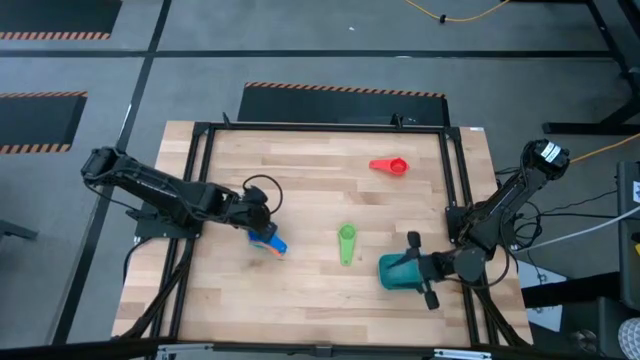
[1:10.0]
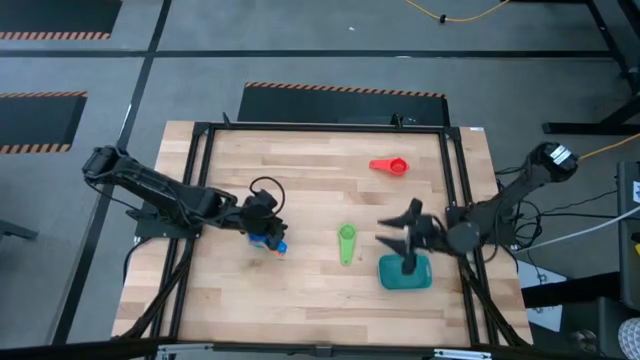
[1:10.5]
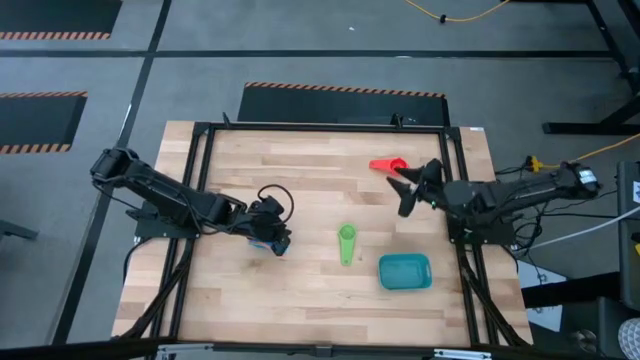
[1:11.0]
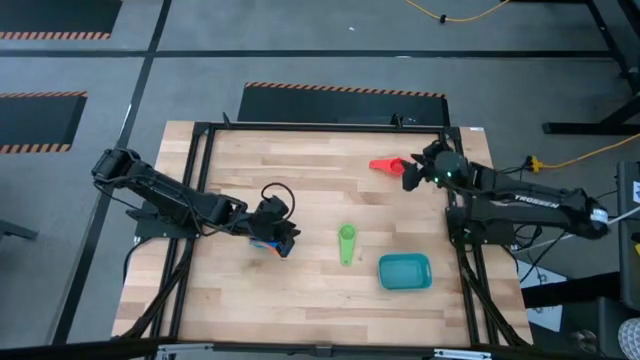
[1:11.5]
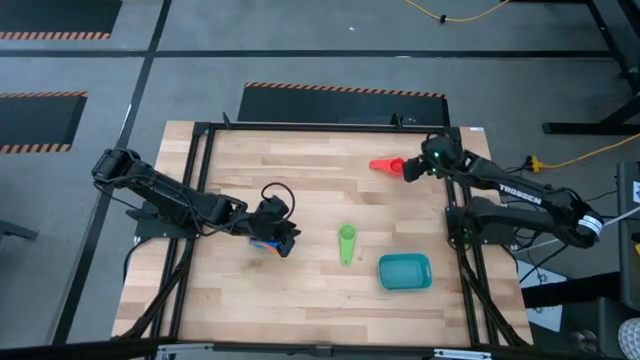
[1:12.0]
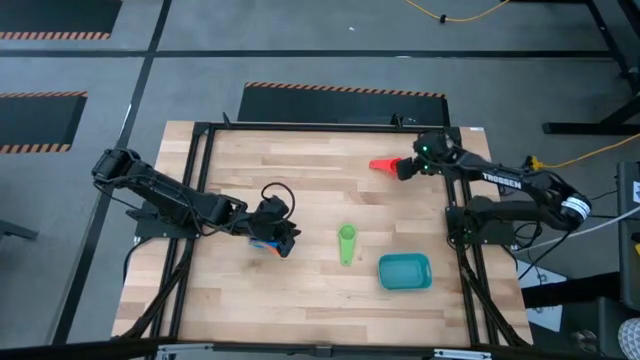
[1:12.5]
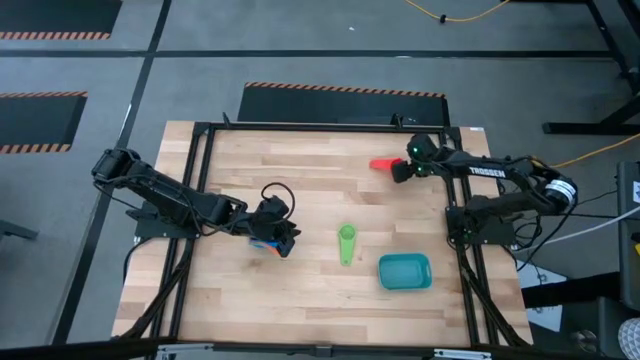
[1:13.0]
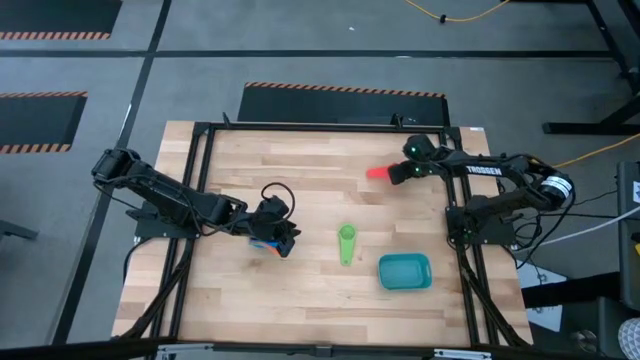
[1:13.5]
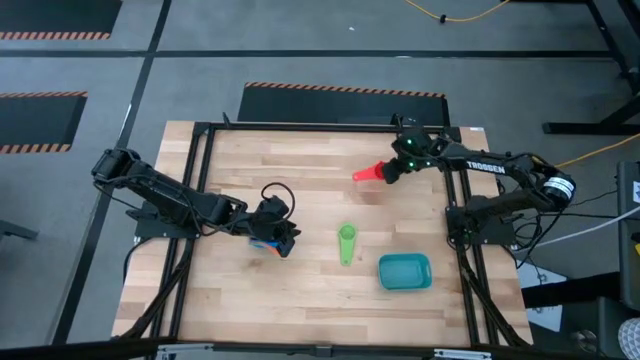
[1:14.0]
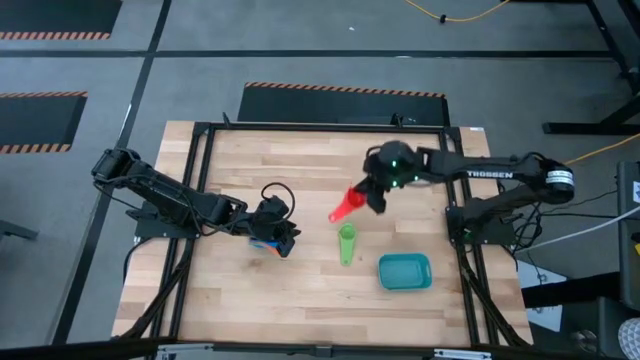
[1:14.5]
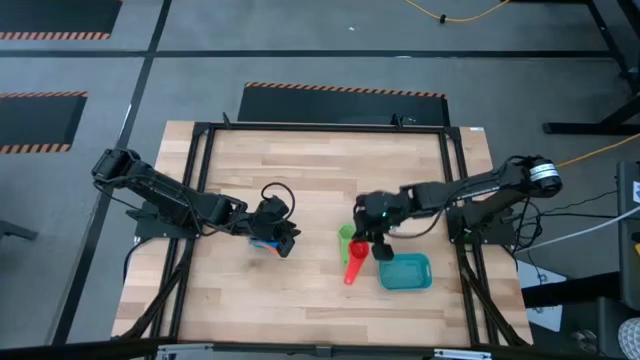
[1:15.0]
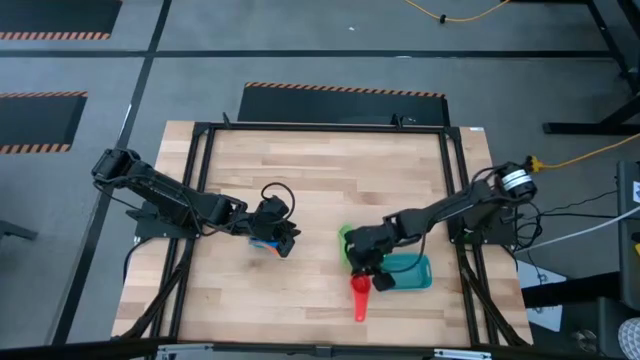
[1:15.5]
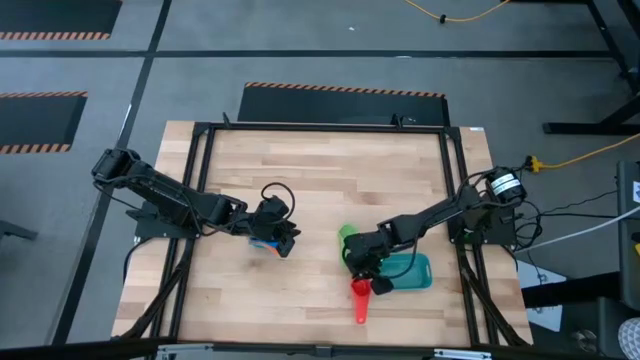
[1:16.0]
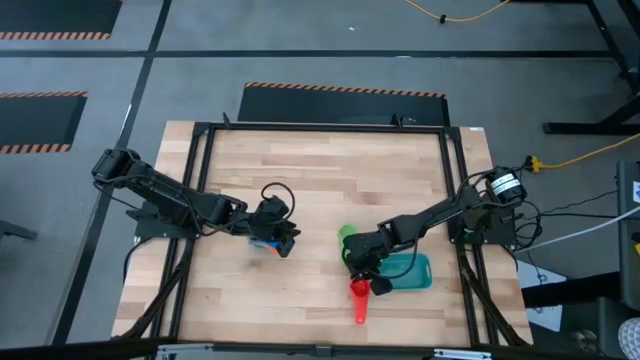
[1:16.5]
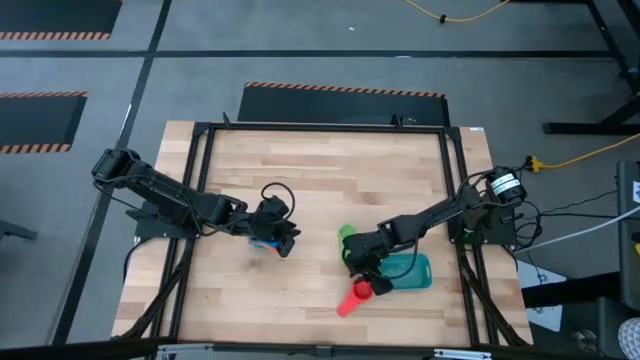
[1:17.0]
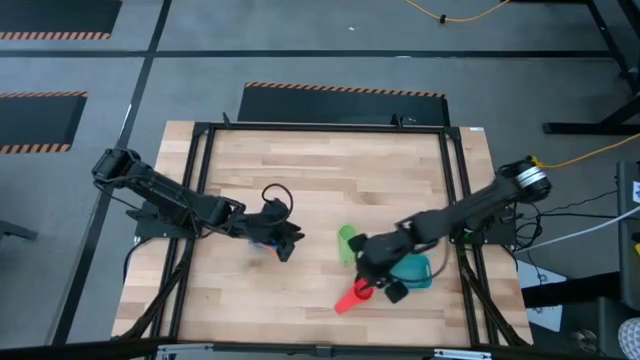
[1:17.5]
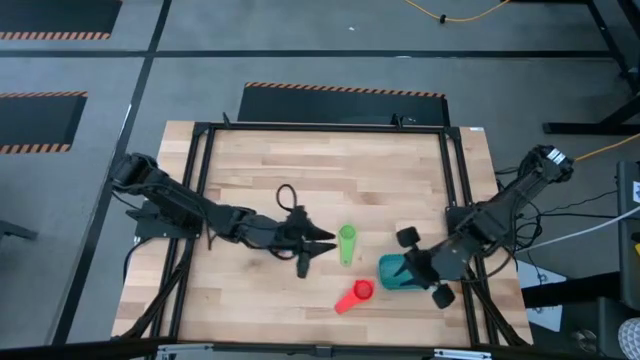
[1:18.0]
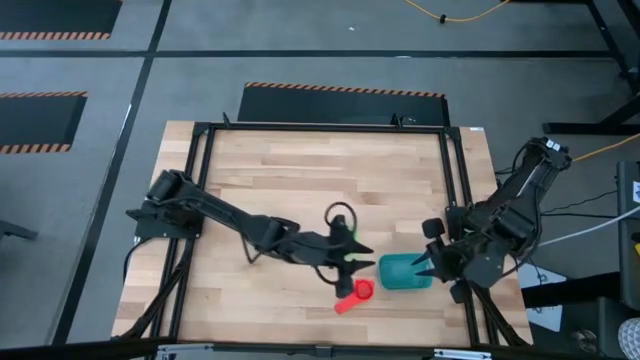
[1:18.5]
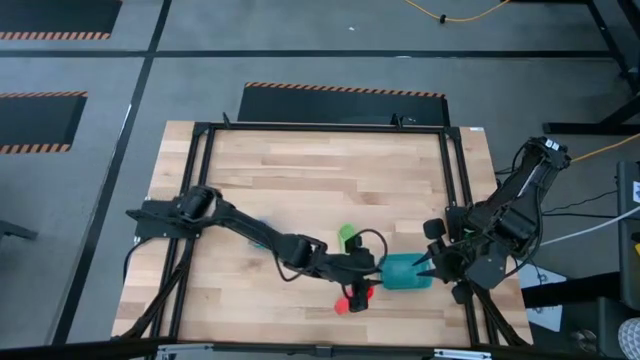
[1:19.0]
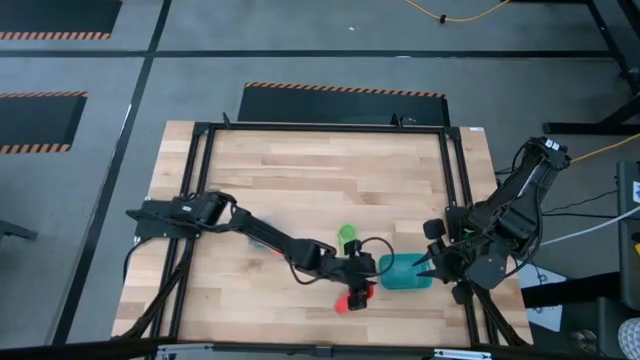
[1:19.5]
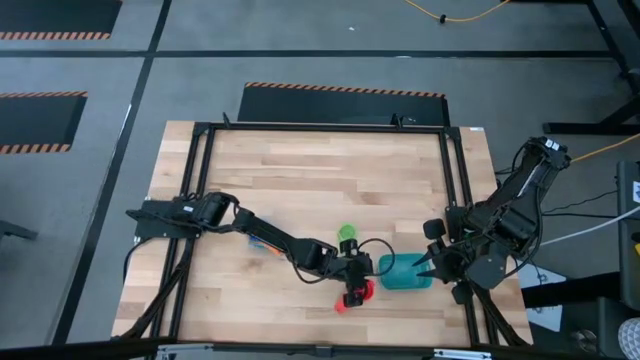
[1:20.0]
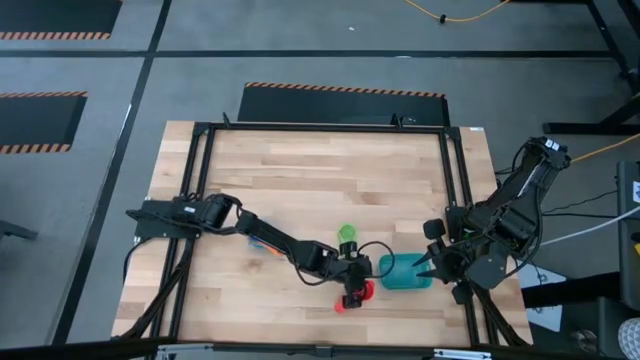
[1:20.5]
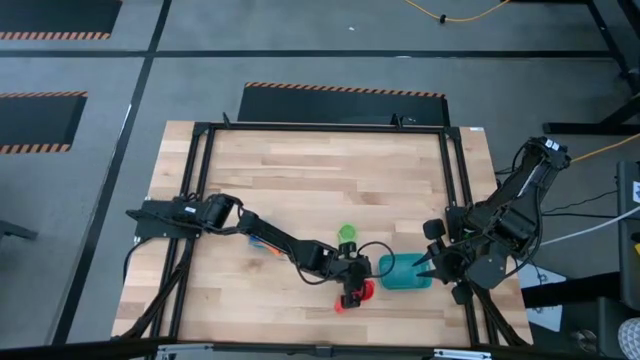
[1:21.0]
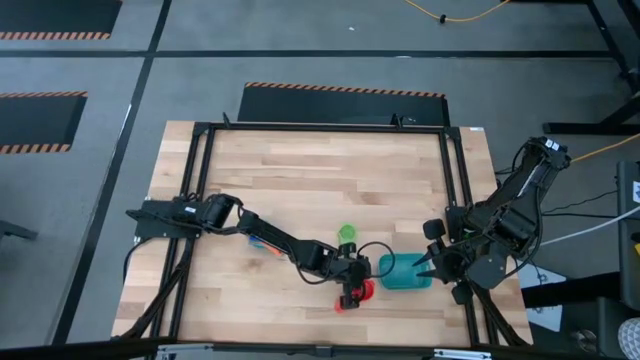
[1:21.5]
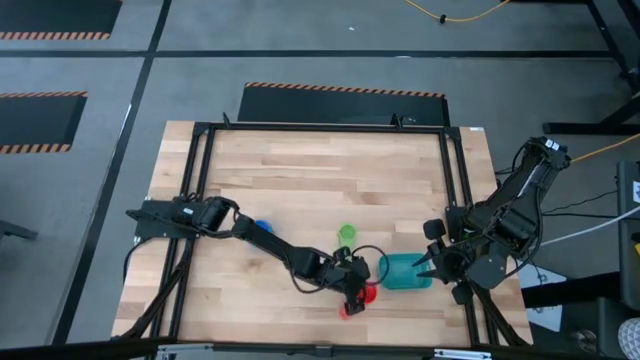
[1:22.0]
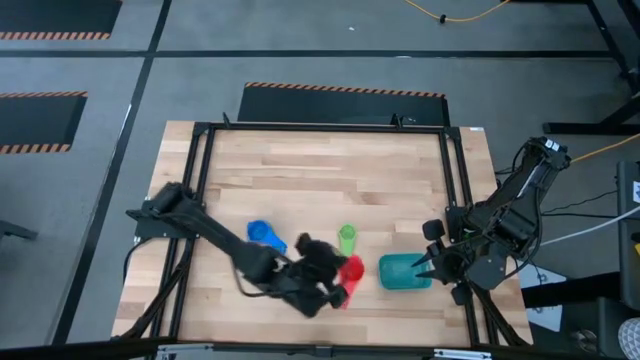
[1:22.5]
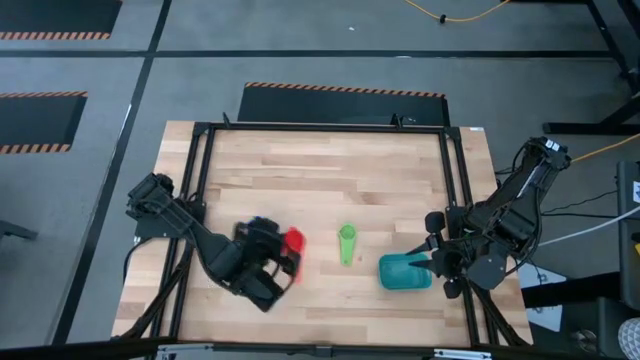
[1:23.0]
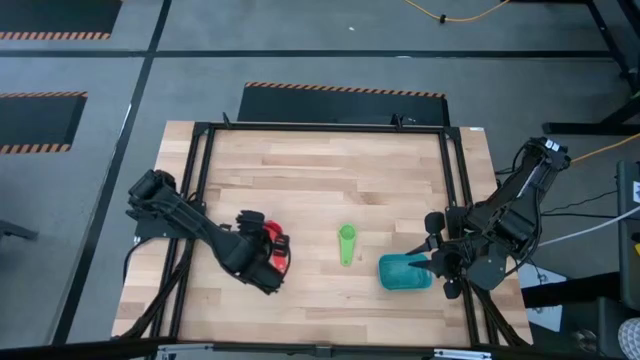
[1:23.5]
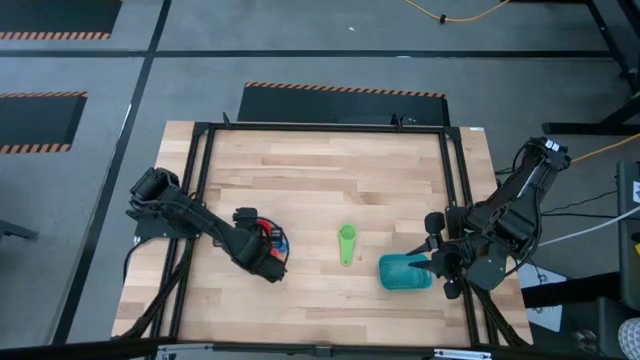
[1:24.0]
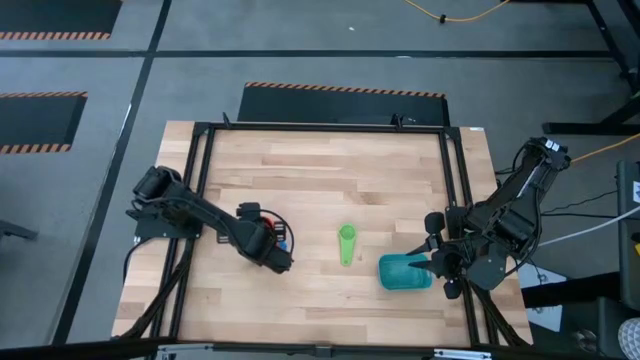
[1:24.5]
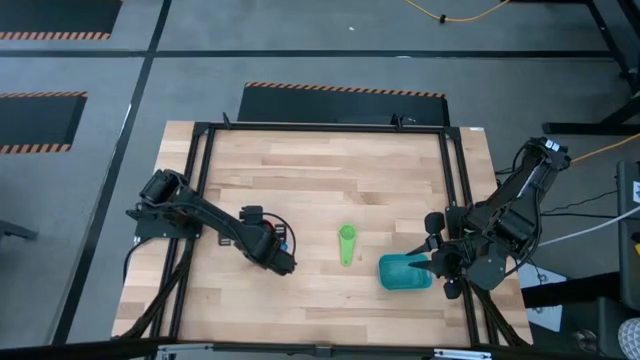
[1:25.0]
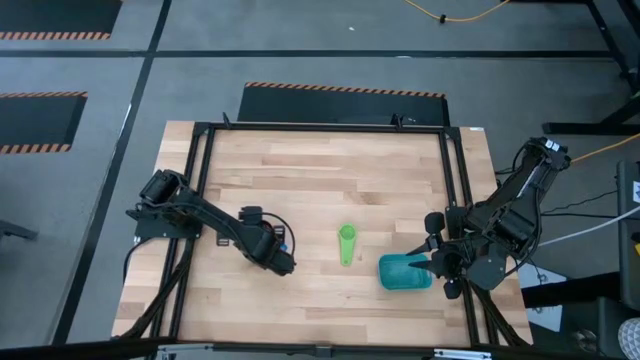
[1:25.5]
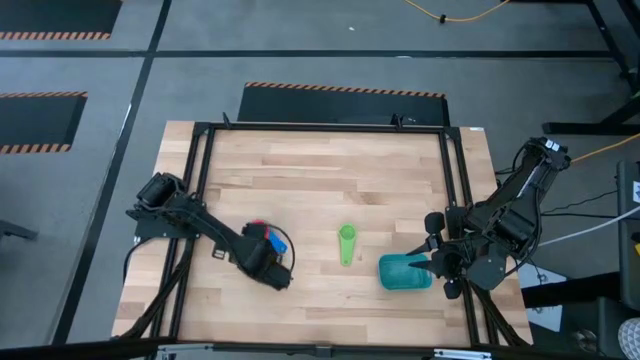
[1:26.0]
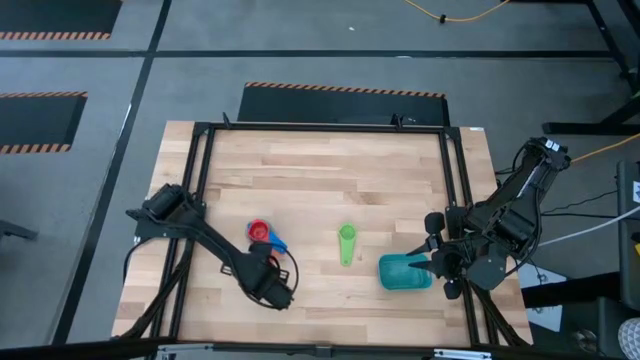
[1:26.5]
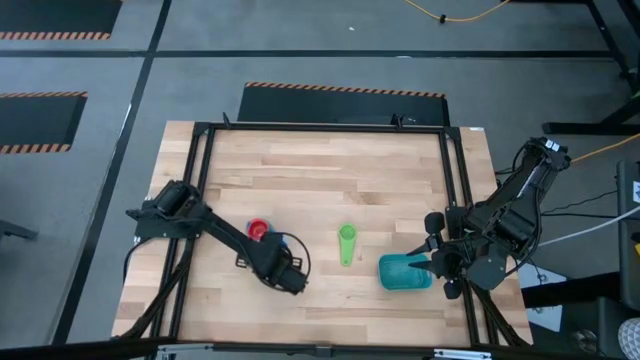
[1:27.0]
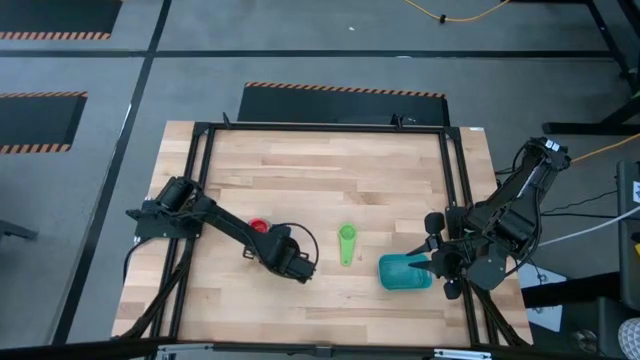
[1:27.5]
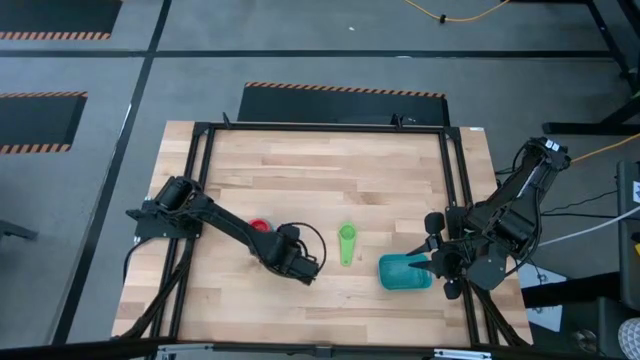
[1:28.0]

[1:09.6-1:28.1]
Task: Nest measuring cups in basket
Stack the red measuring nest cup into the blue measuring nest cup

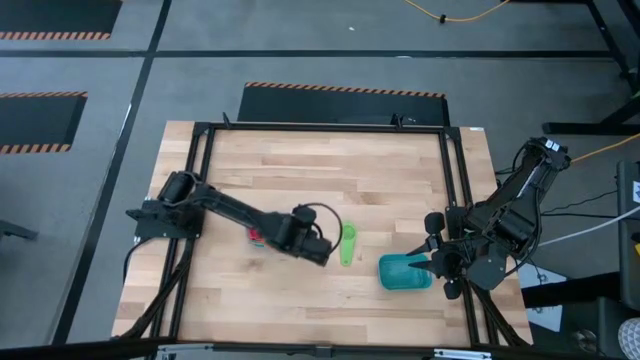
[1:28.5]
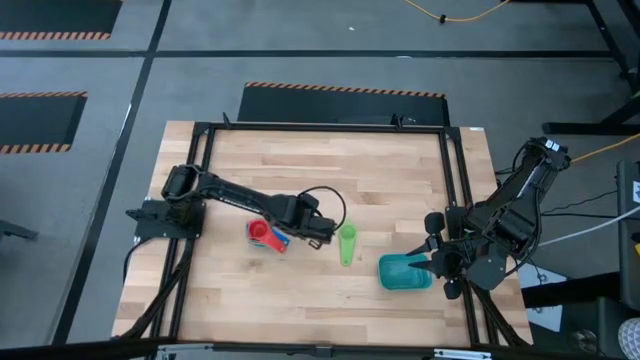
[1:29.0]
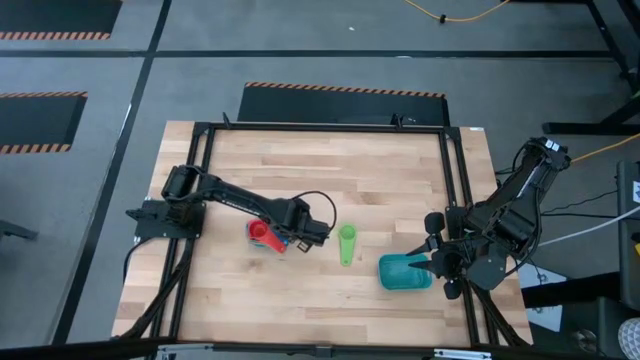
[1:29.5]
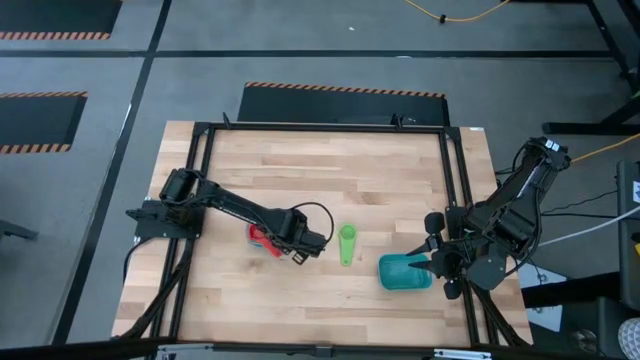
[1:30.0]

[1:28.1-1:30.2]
Adjust the blue measuring nest cup

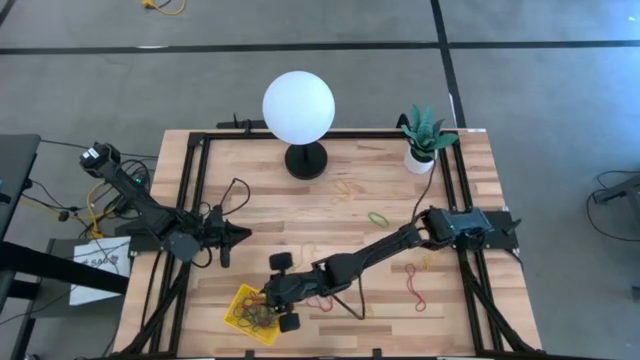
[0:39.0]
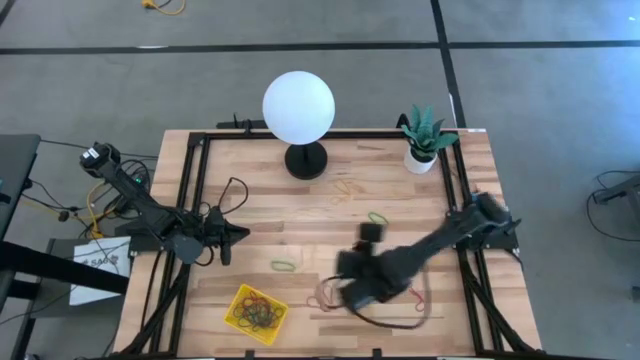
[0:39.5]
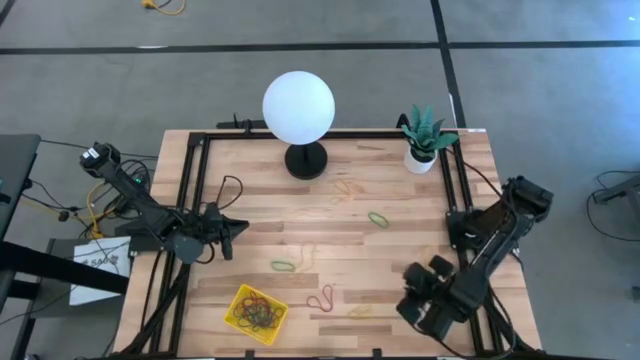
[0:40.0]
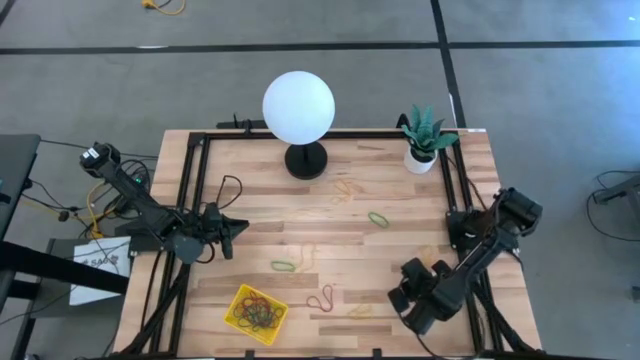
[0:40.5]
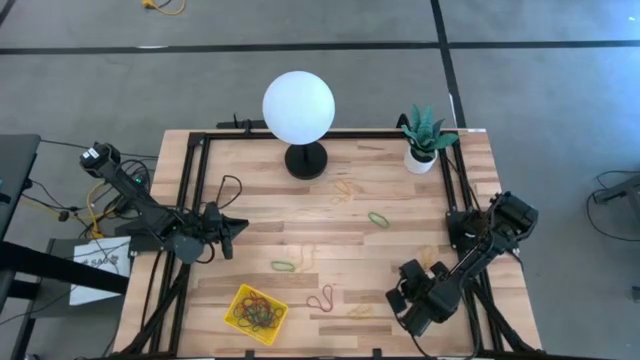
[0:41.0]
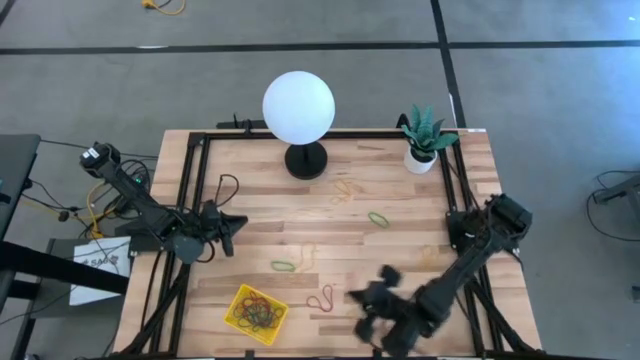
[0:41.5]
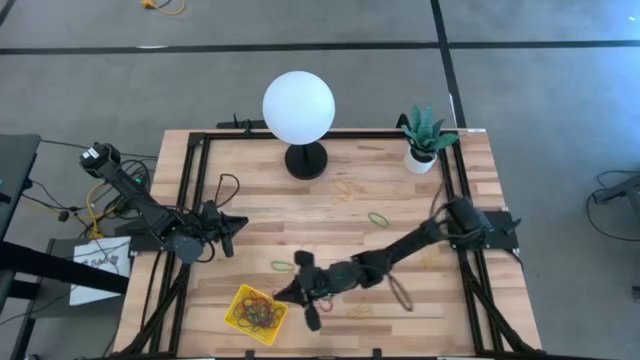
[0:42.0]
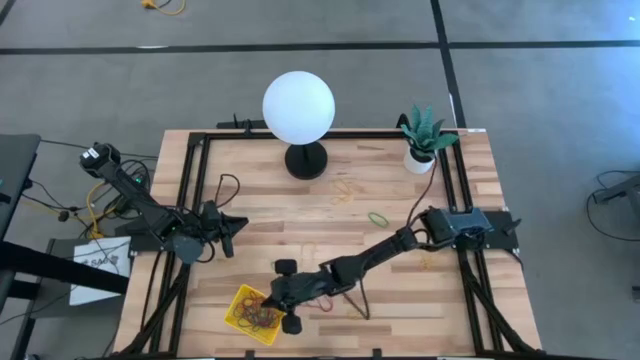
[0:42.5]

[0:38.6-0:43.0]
Task: Pick and place items into bin
Put the red rubber band into the yellow bin
